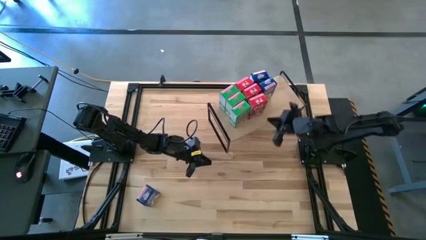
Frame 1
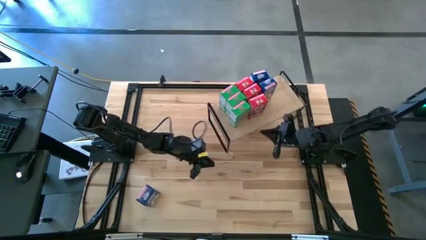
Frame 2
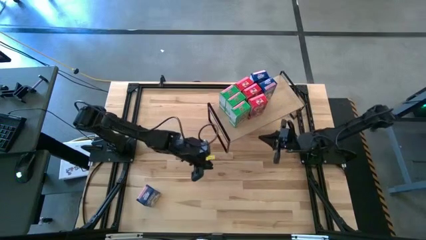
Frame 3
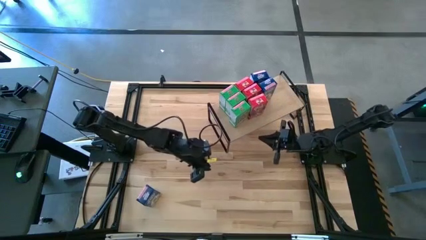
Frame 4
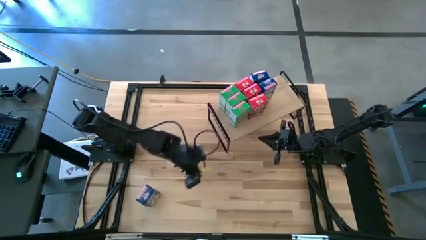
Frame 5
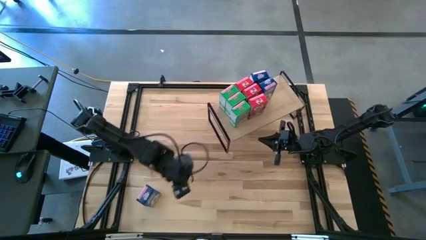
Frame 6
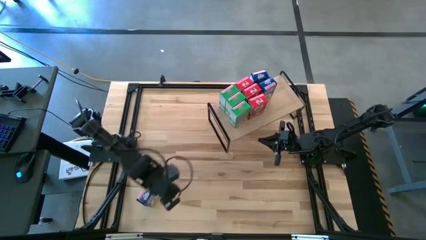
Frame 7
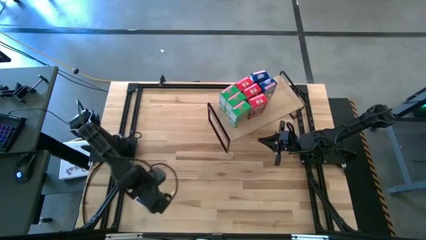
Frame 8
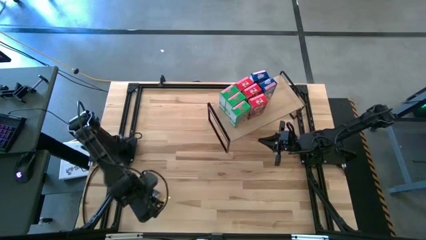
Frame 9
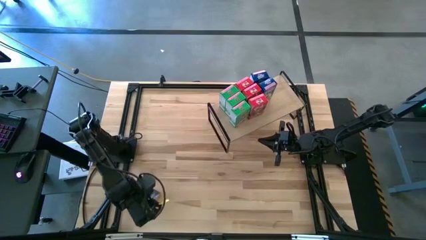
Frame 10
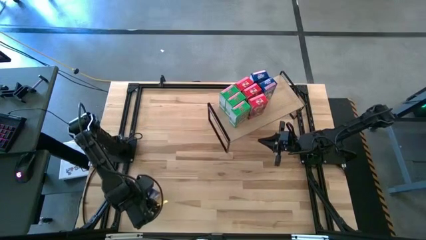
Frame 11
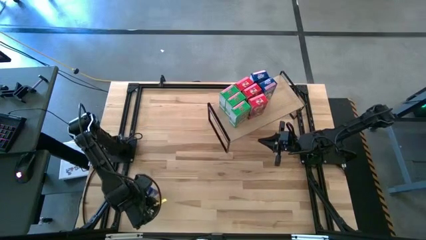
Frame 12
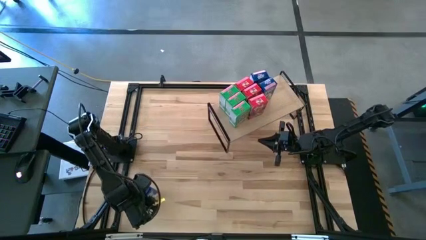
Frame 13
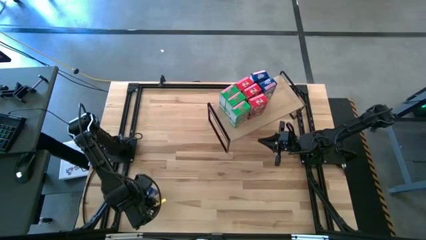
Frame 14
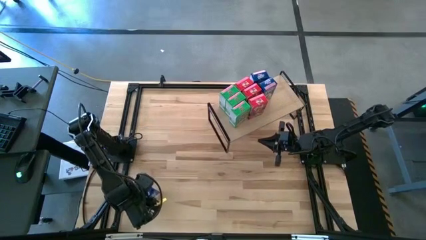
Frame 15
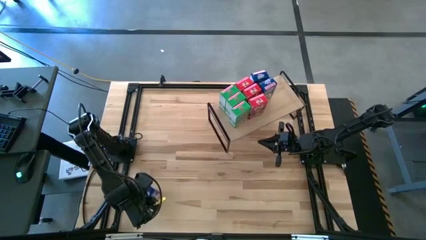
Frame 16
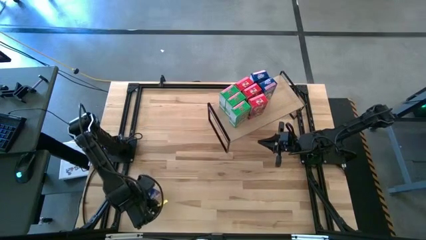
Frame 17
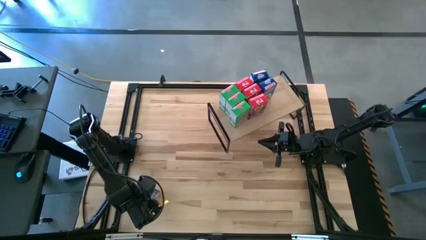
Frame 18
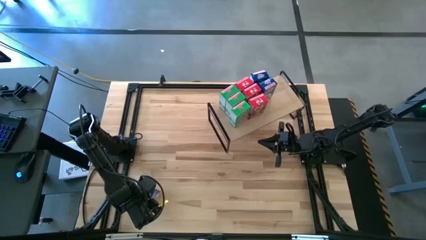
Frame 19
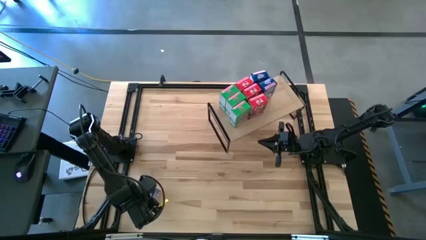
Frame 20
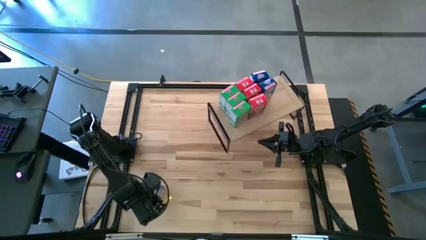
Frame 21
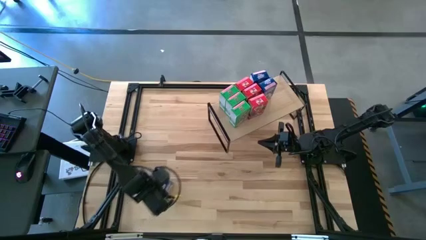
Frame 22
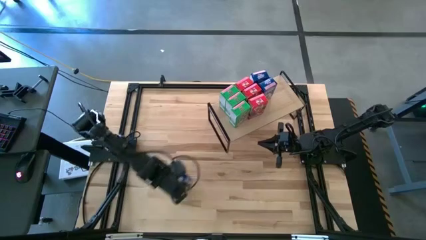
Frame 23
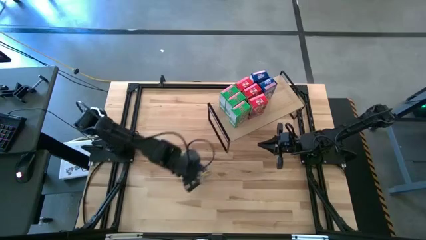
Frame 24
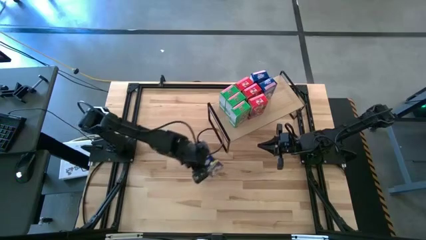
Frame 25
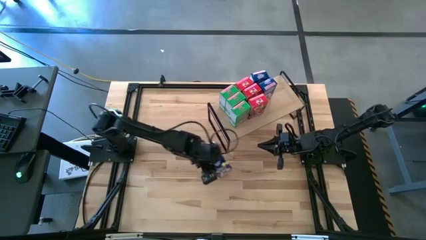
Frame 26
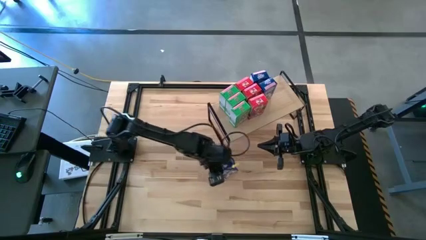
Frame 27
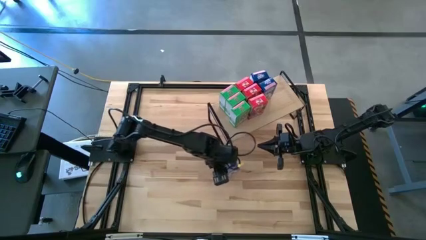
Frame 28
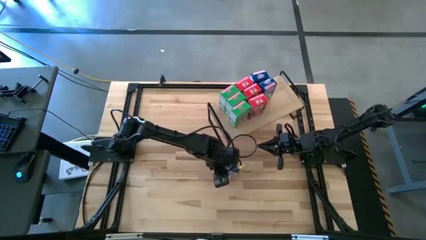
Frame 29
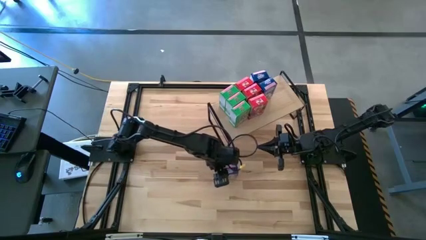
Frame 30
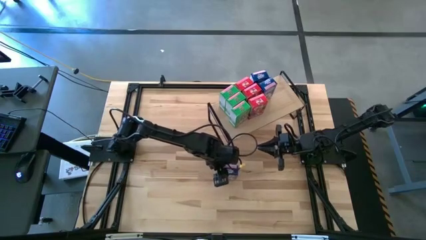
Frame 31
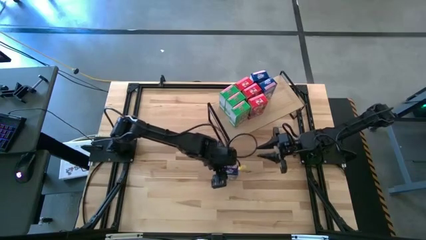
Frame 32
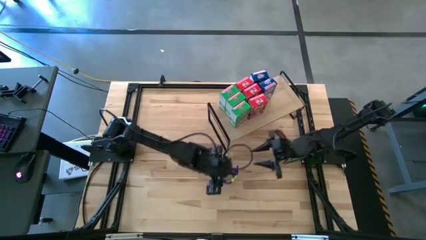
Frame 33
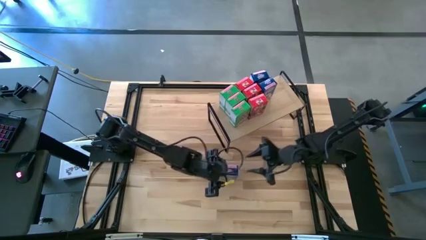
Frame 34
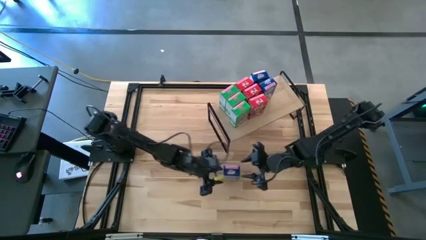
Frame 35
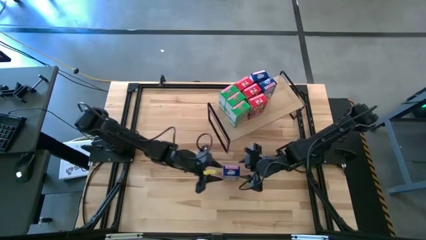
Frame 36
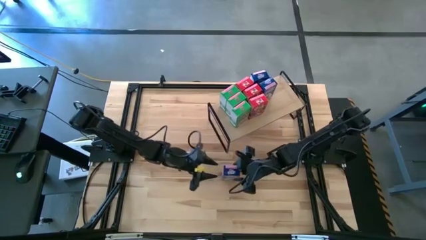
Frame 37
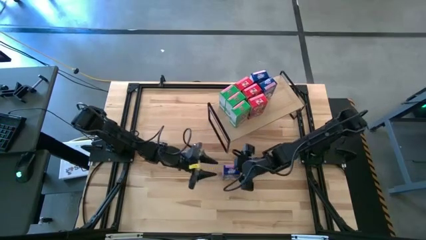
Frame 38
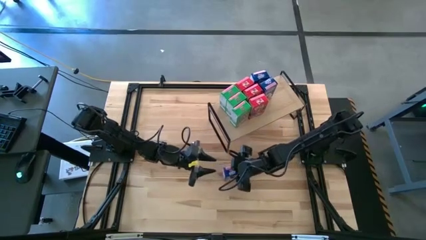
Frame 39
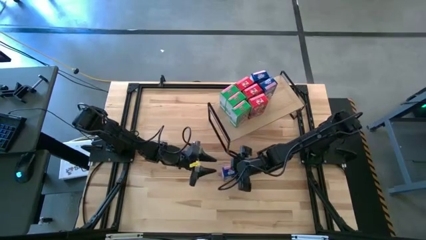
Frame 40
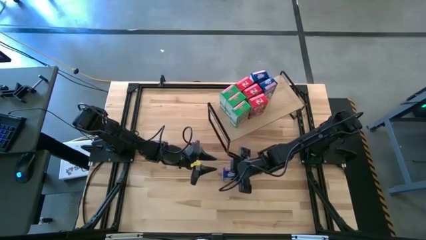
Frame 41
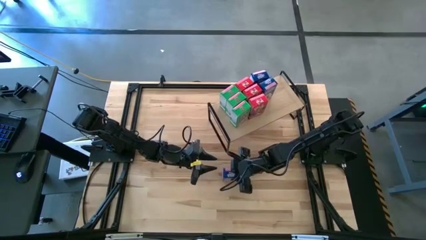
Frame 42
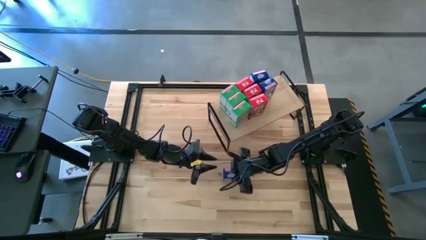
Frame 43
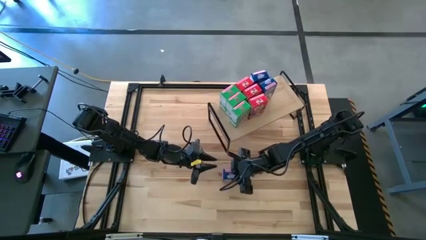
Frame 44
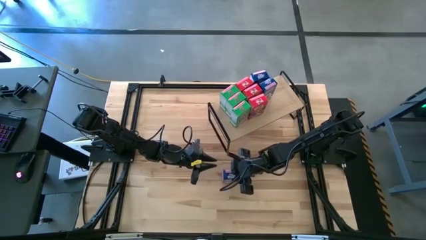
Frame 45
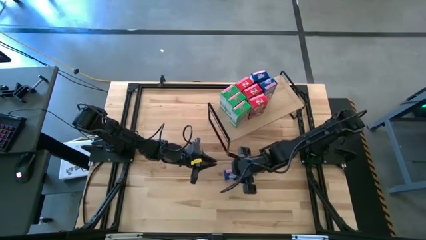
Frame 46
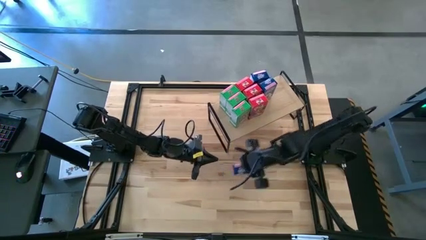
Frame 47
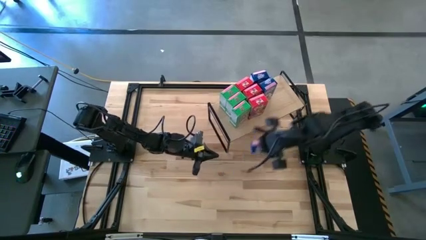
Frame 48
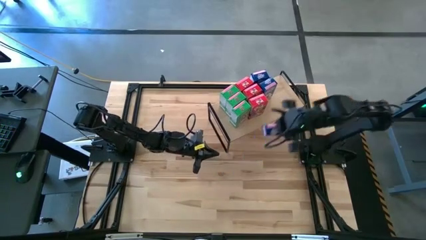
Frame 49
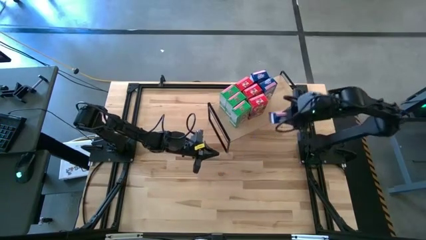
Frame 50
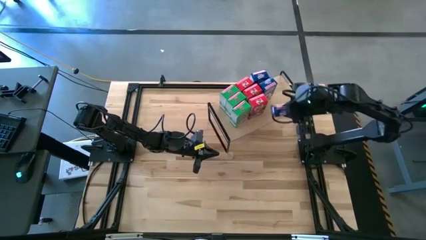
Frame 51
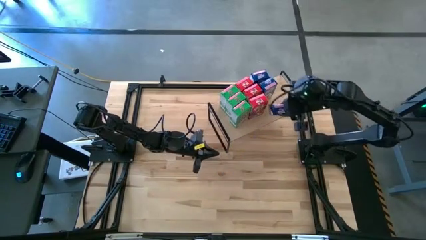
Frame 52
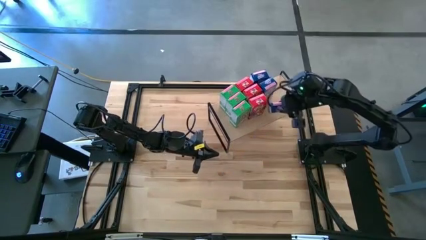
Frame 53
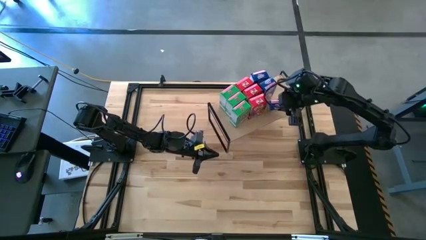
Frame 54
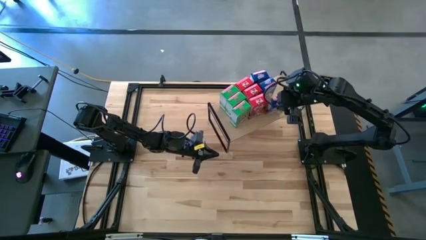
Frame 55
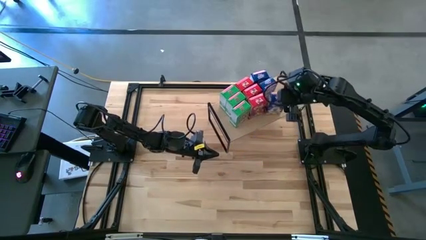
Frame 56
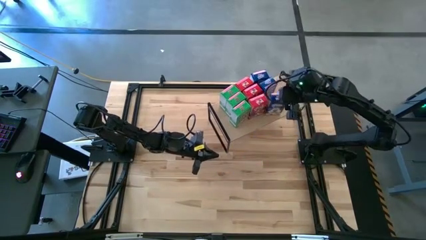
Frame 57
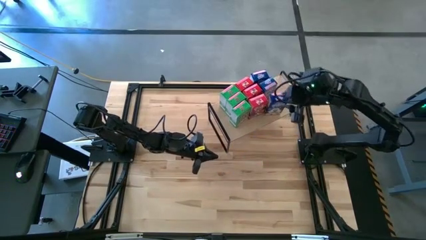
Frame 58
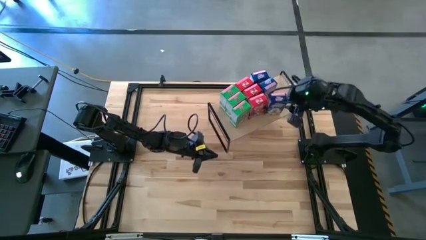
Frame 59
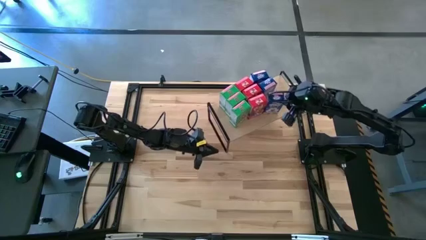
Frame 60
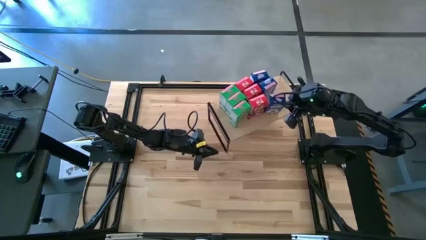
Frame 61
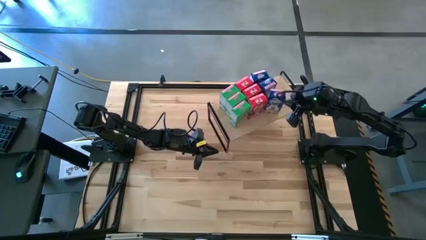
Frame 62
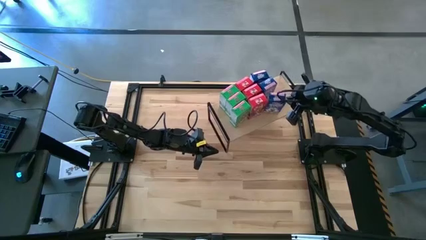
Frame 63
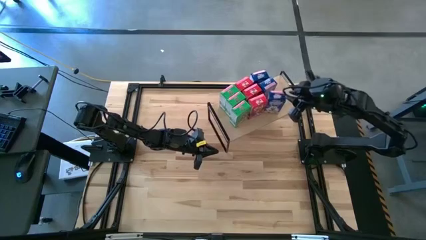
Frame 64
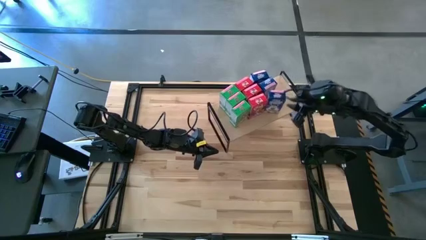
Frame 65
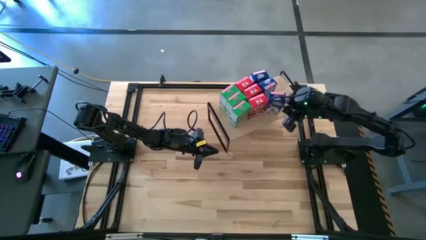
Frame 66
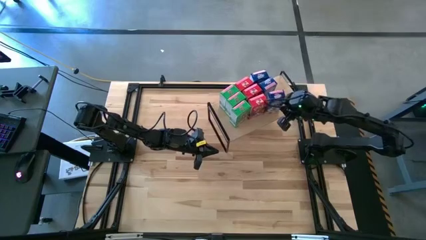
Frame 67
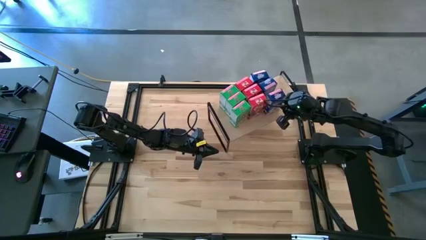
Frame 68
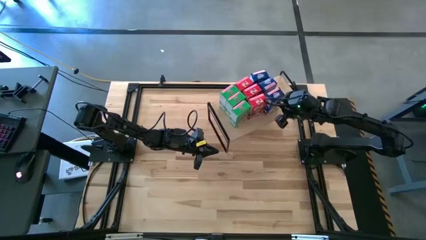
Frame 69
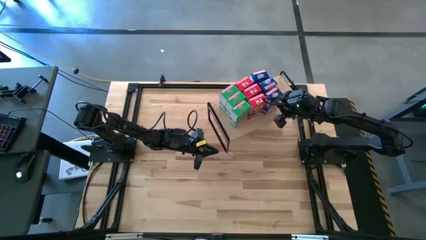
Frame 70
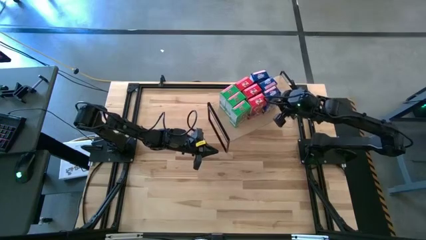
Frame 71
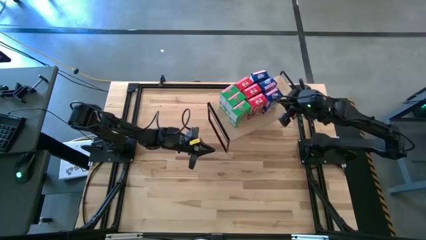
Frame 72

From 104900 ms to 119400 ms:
Task: Stack cereal on shelf
Put the blue cereal box on the shelf and aligned with the other blue cereal boxes

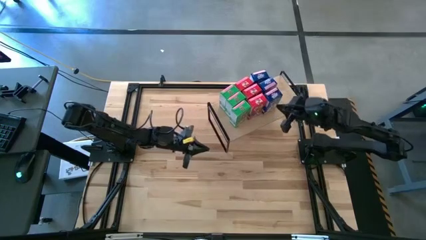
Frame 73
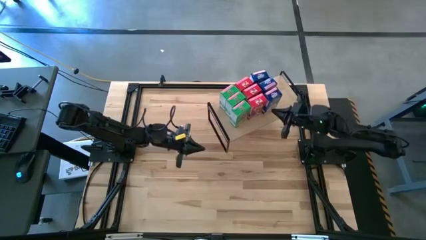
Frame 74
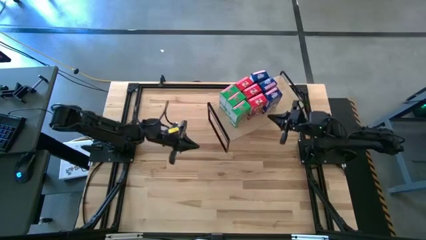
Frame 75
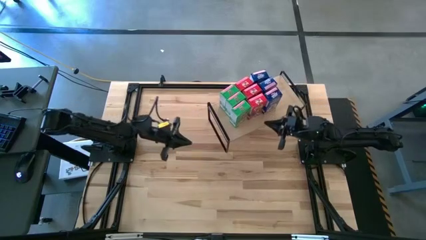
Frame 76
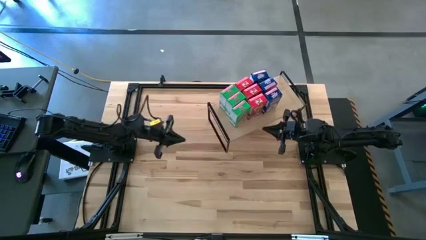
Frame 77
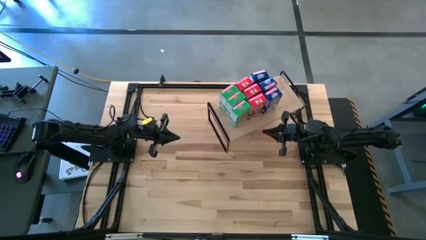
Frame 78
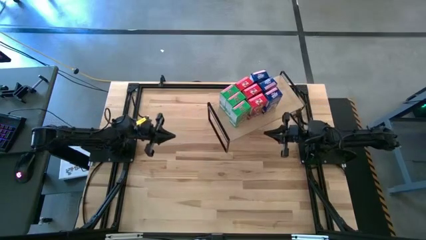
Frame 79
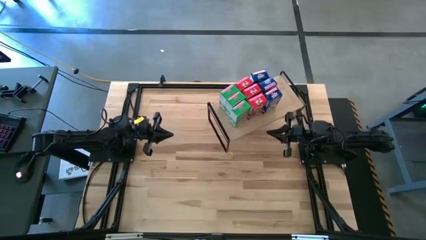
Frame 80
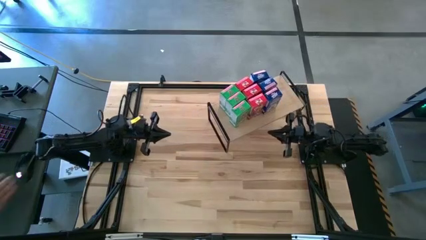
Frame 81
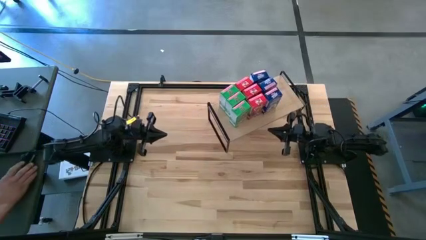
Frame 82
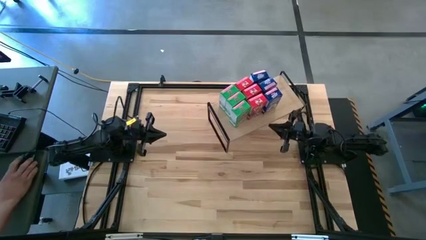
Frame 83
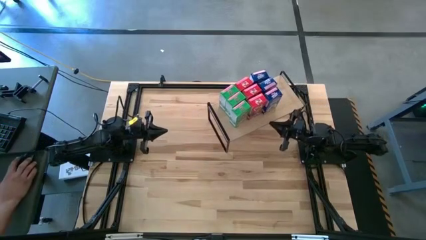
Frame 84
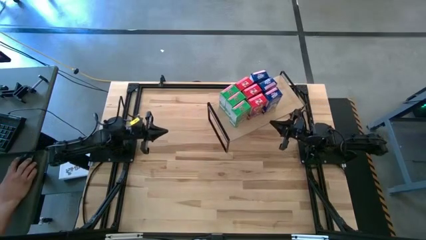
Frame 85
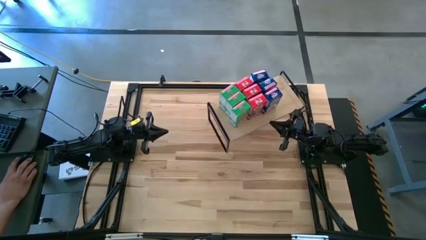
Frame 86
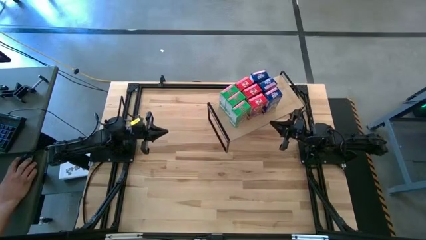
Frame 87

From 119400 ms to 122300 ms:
Return to Home Position
